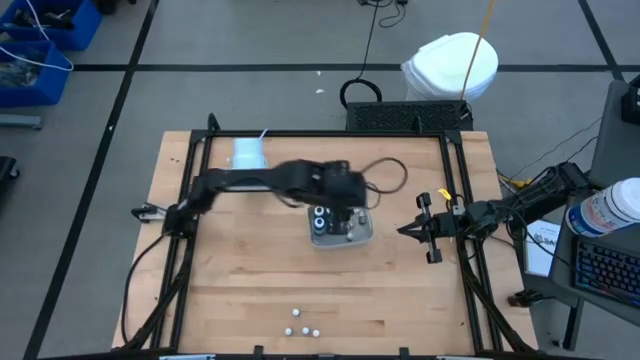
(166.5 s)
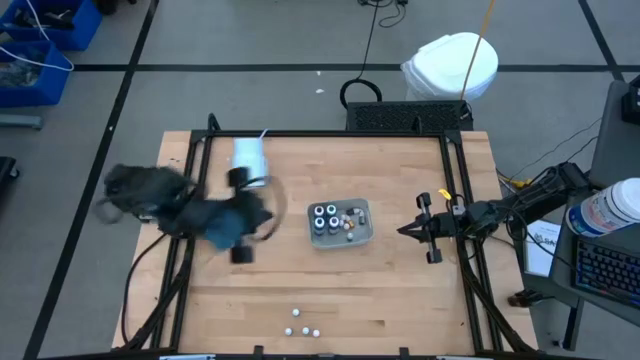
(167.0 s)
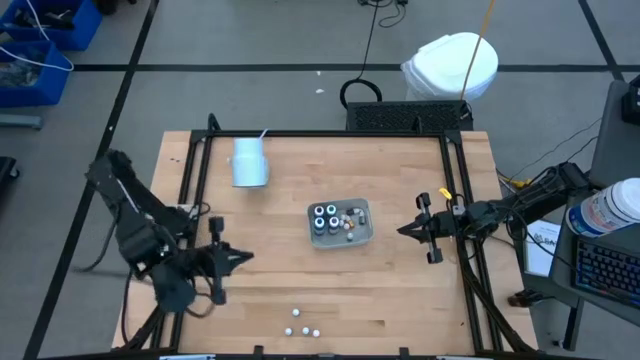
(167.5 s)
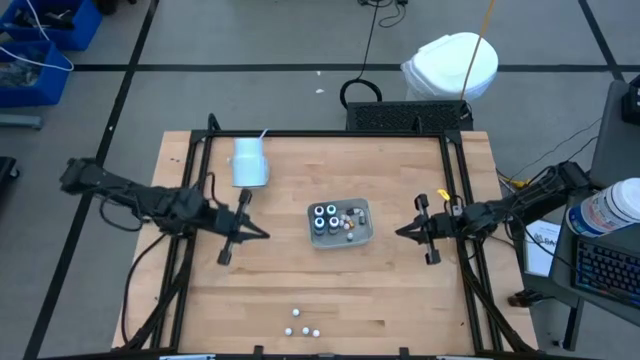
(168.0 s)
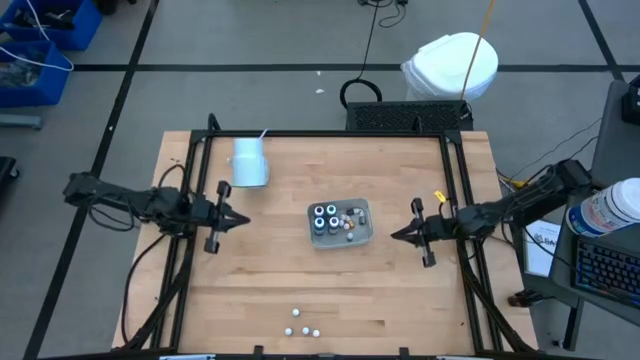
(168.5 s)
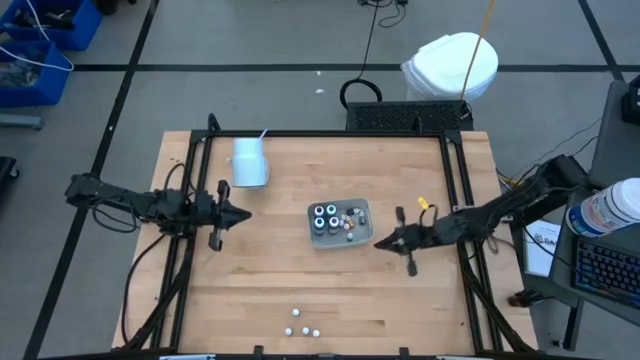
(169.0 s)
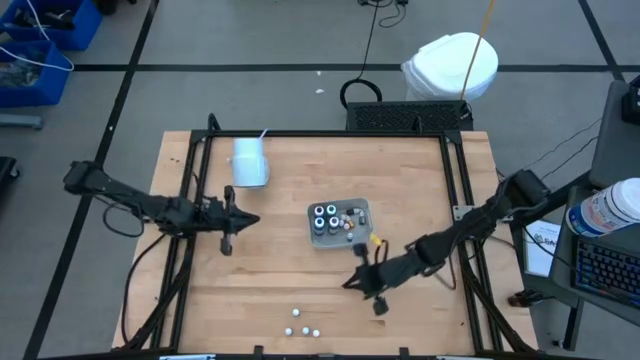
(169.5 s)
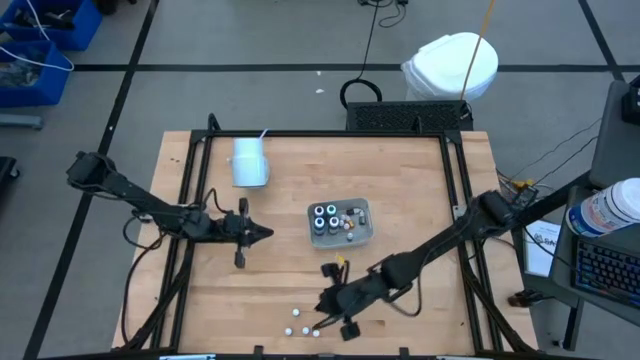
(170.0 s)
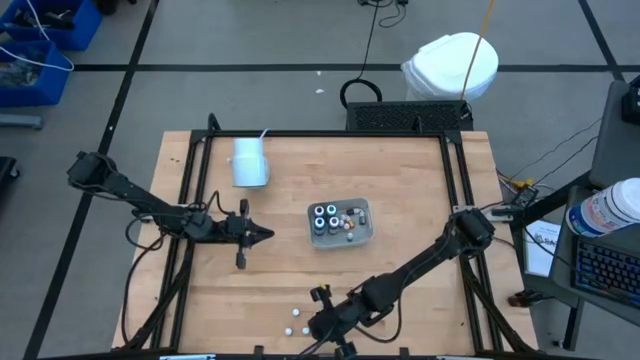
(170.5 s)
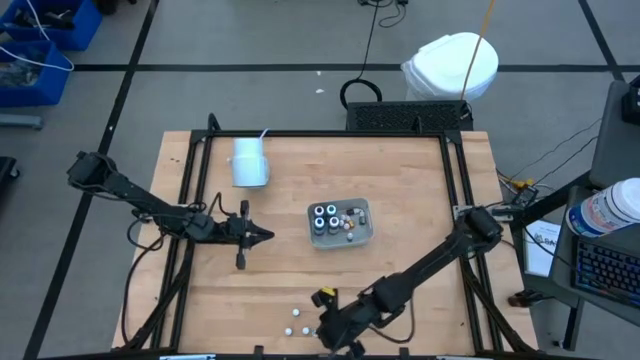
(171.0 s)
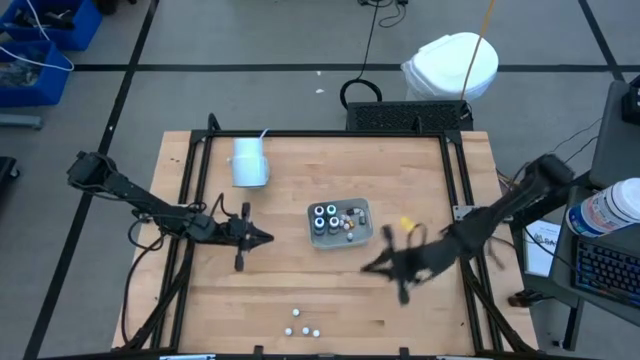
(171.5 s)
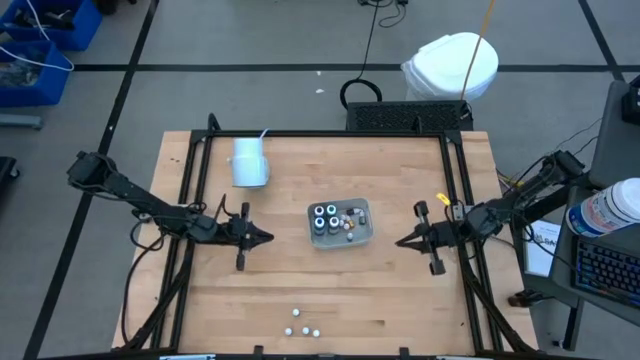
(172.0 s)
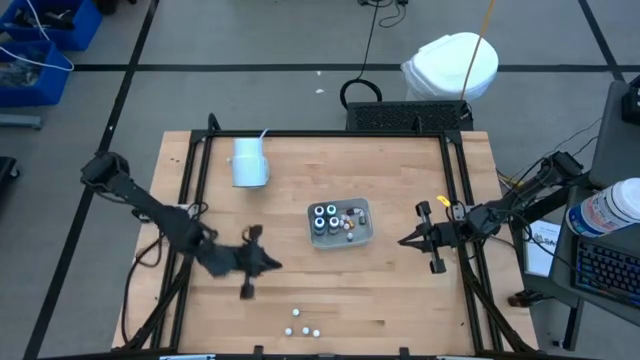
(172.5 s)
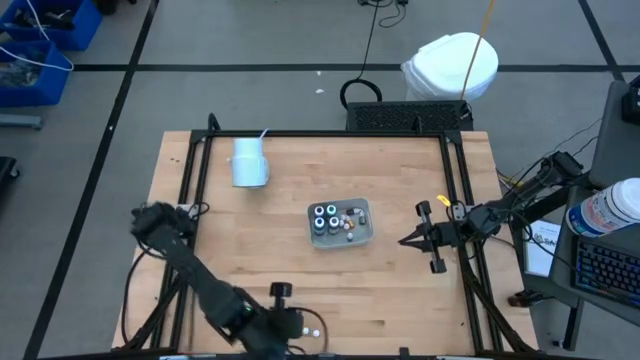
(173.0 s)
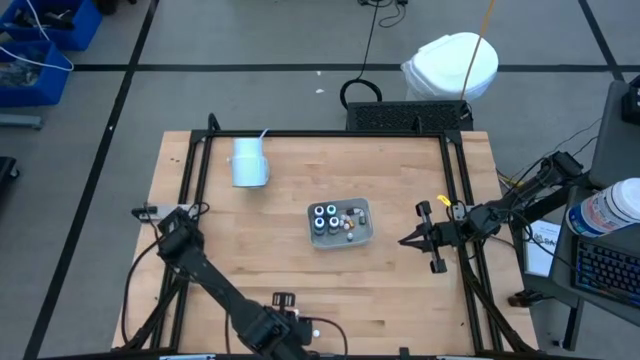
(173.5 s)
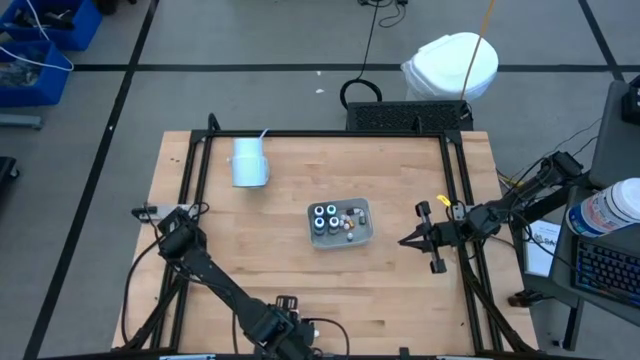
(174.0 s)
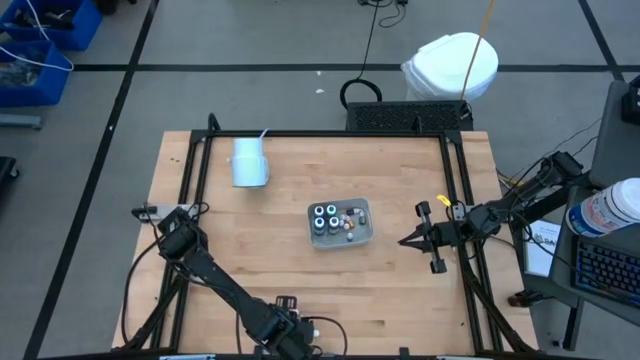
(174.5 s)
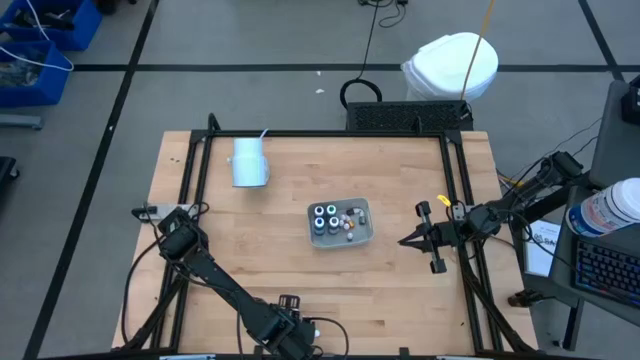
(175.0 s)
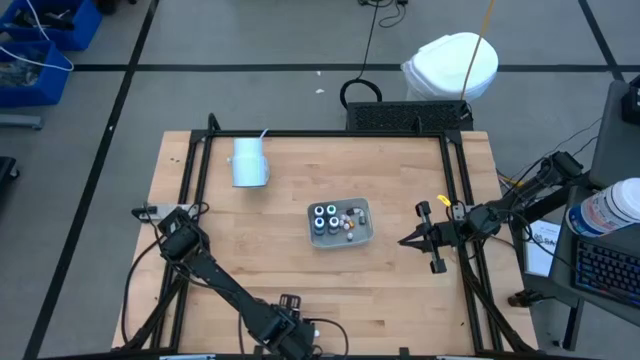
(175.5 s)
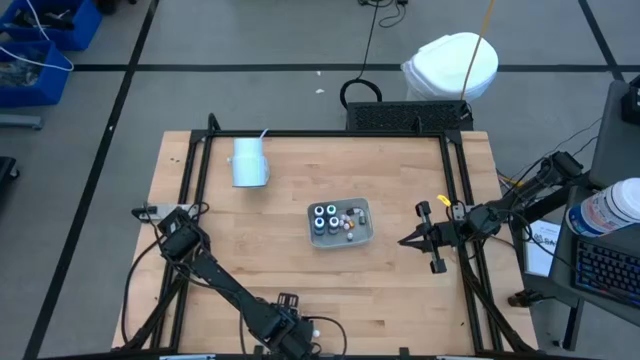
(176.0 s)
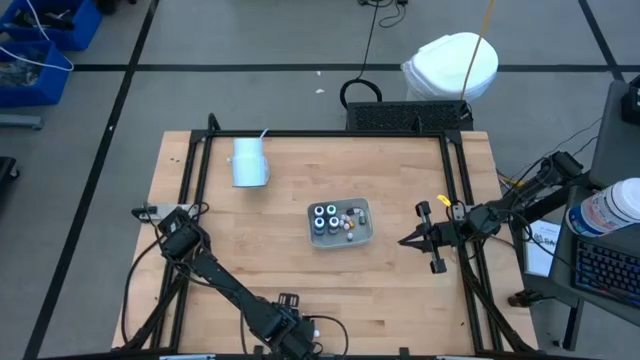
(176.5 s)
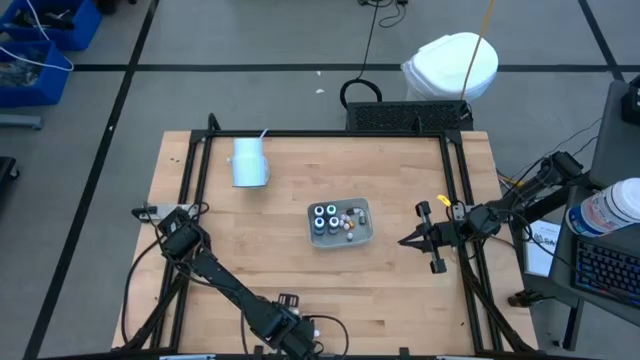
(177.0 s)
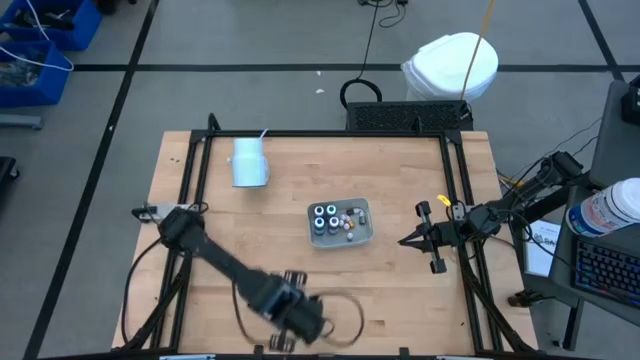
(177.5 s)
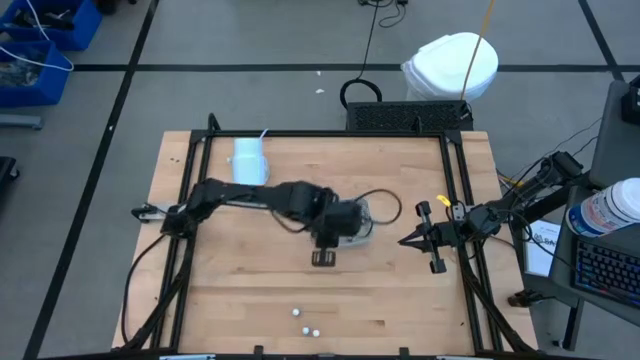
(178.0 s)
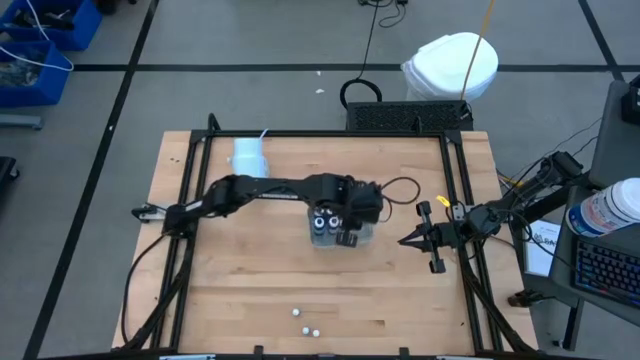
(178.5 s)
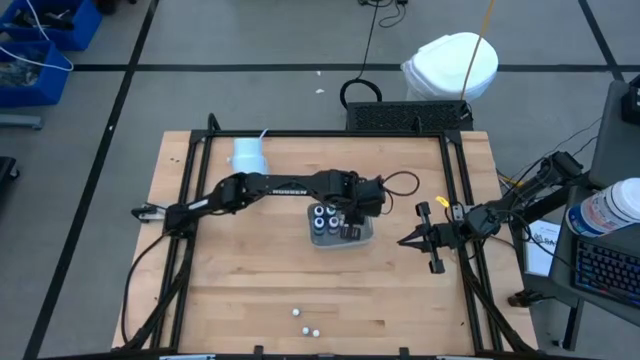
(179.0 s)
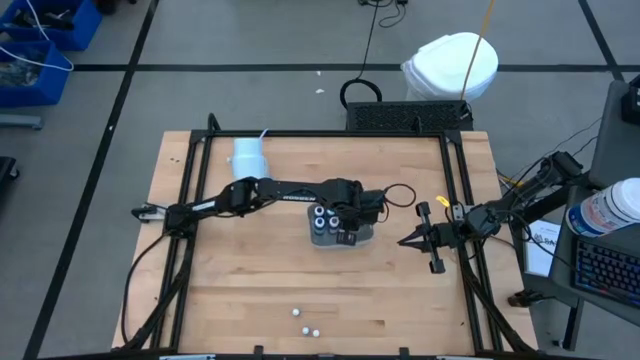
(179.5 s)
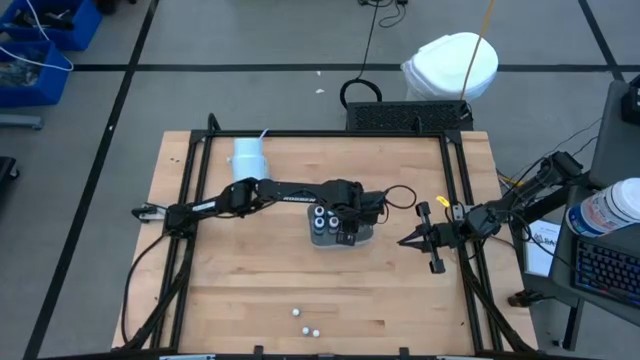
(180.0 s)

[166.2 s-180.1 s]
Task: Pick & Place food coloring
Put the small purple food coloring bottle into the white container

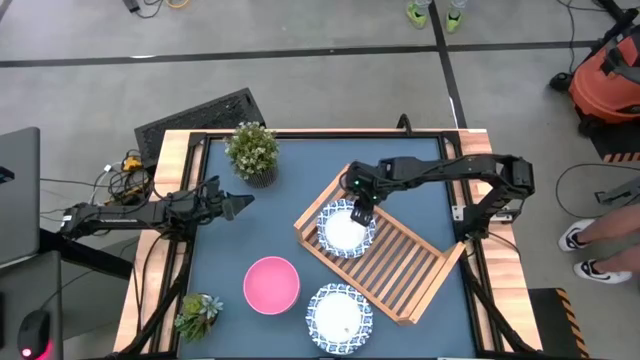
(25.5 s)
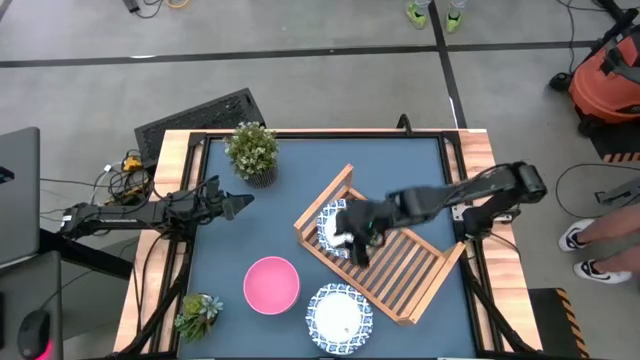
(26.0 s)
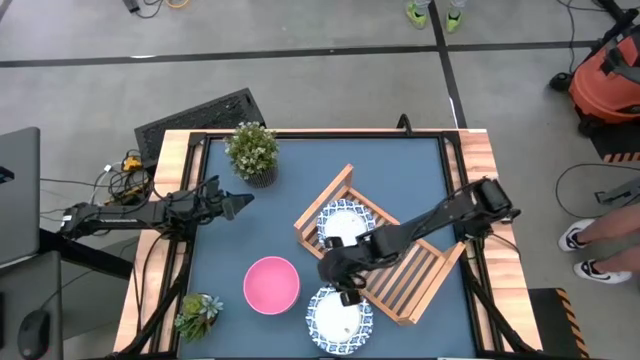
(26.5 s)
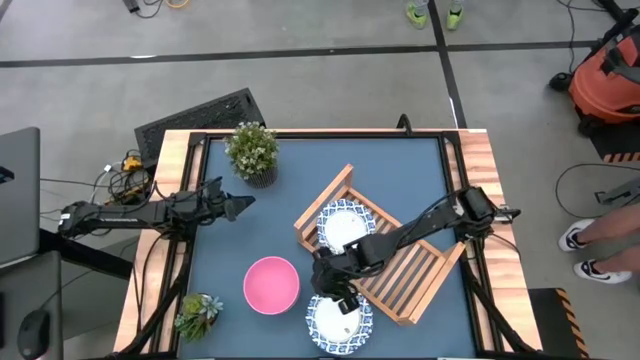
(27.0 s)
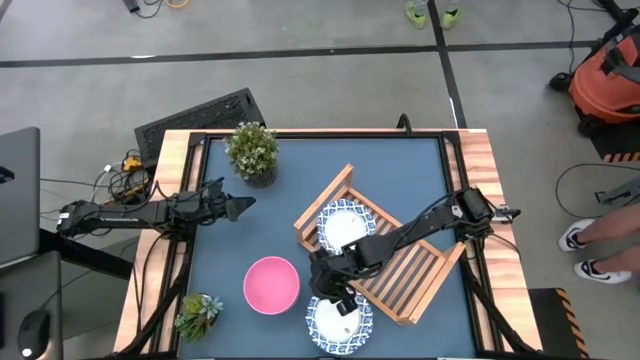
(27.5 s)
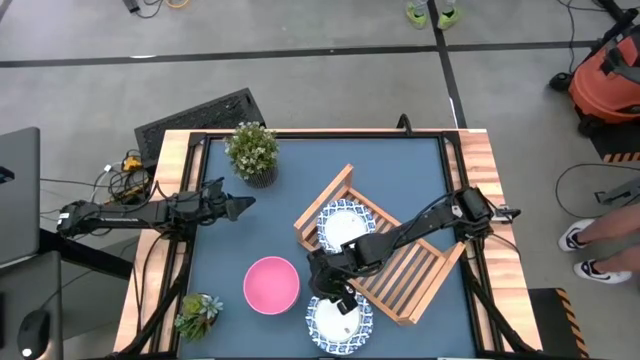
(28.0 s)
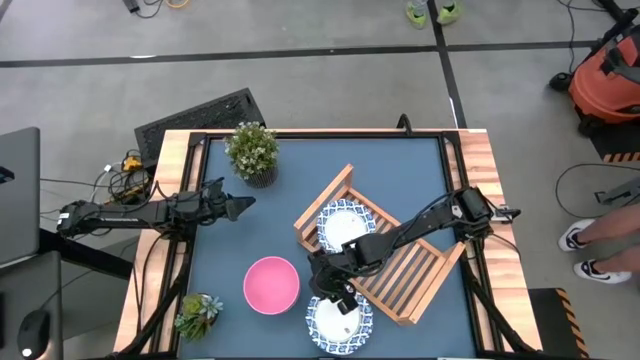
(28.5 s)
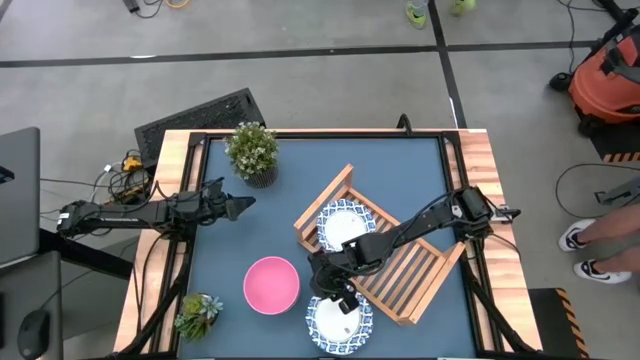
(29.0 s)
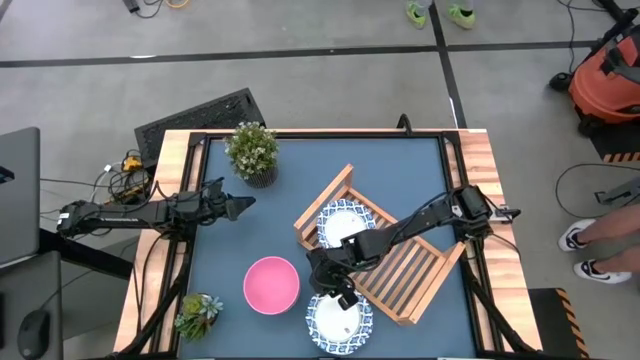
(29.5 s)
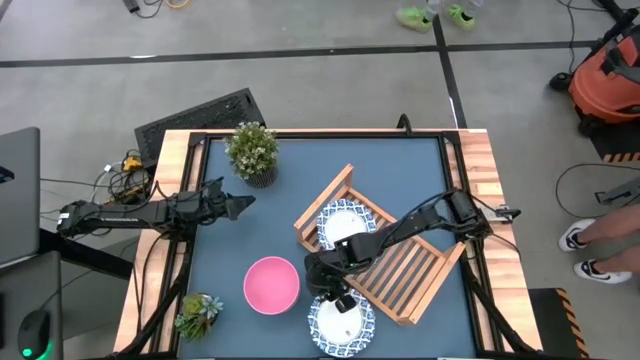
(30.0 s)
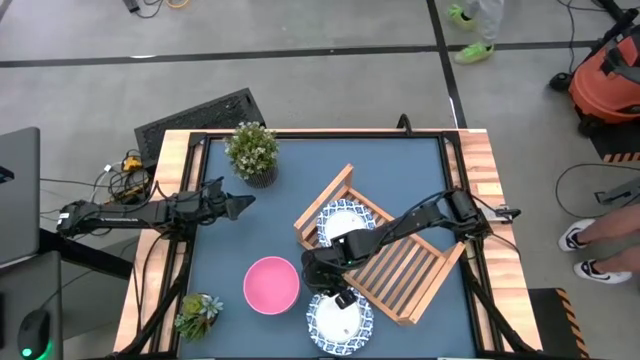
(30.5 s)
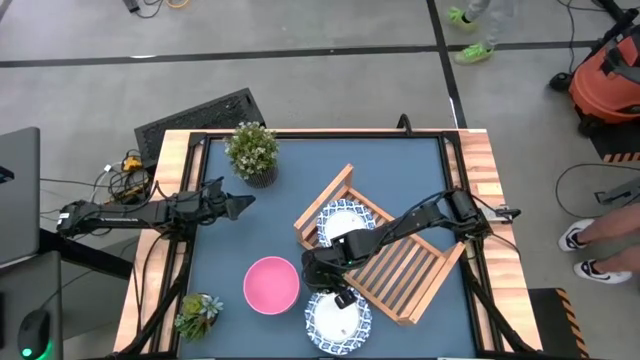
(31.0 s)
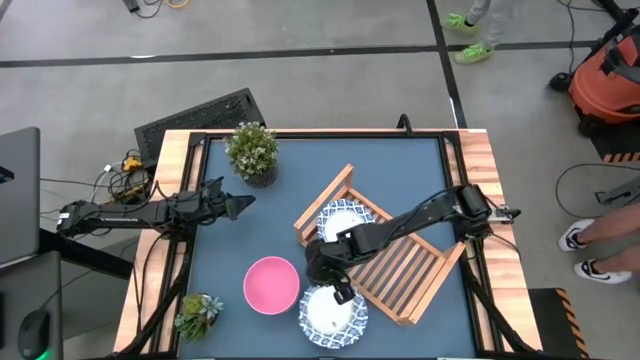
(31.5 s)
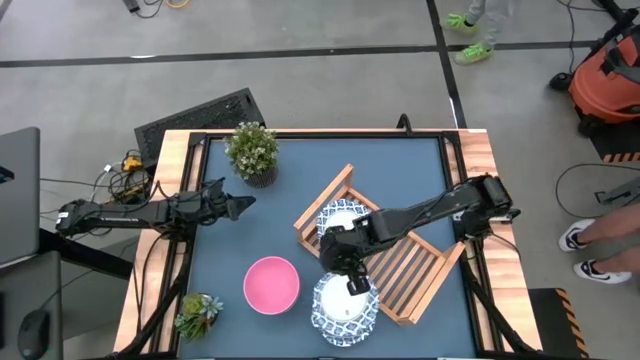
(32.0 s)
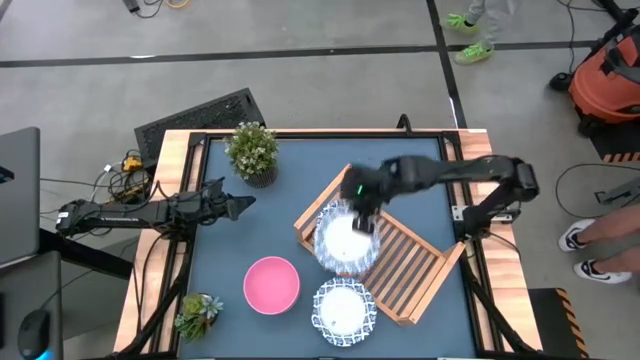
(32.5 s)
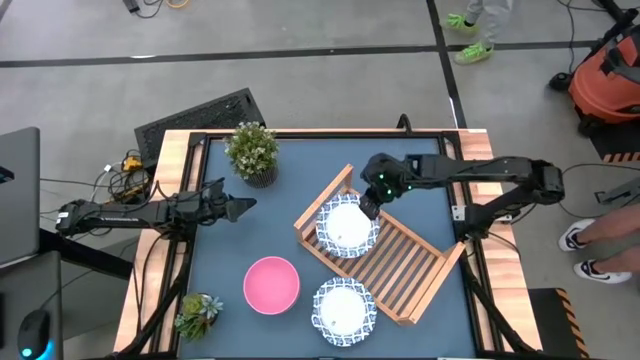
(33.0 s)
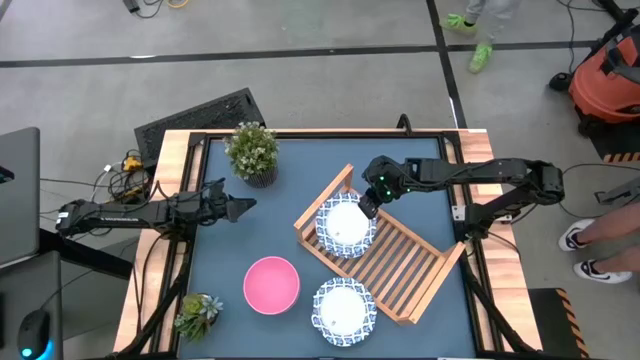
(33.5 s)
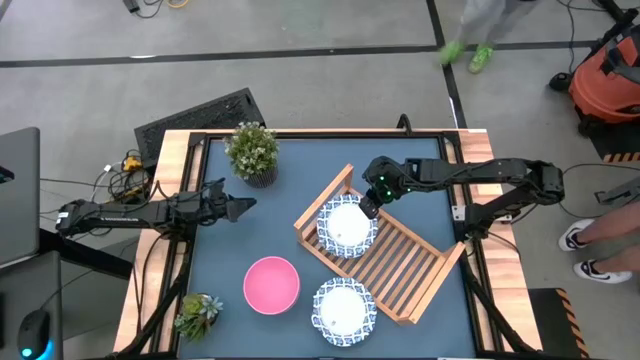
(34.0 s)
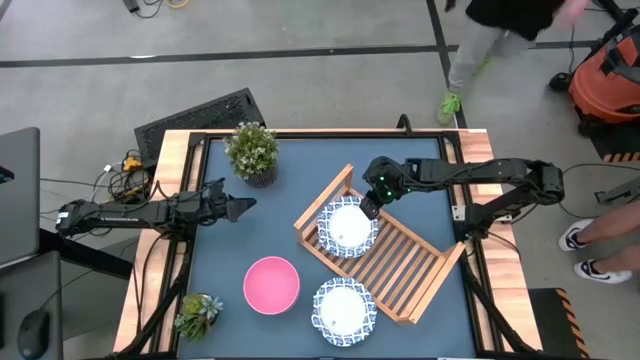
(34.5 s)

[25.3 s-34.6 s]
Task: Place and stack bowls onto a shelf
Stack the blue patterned bowl on the top of the blue patterned bowl on the shelf
